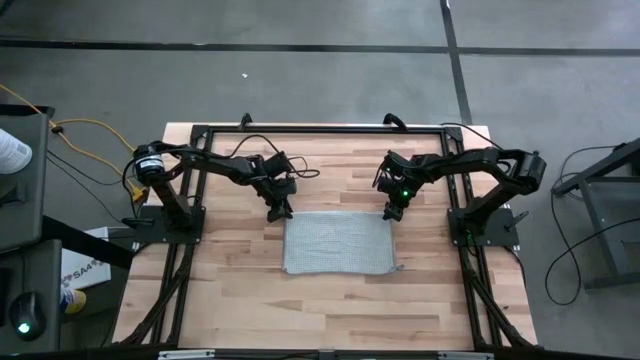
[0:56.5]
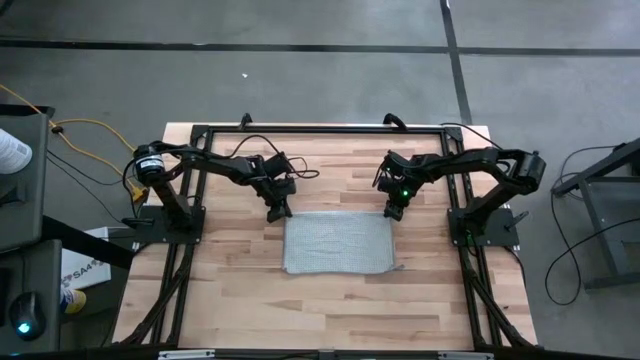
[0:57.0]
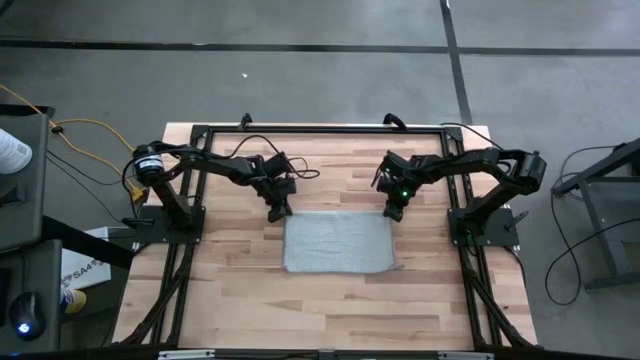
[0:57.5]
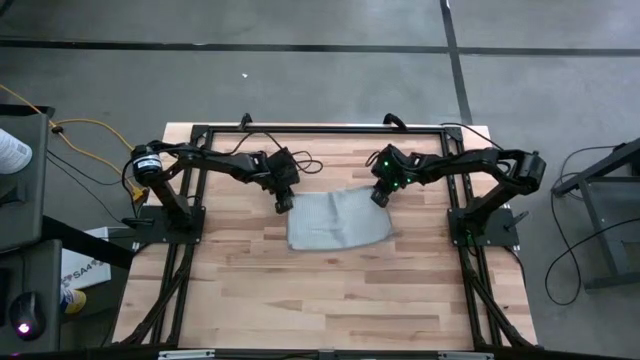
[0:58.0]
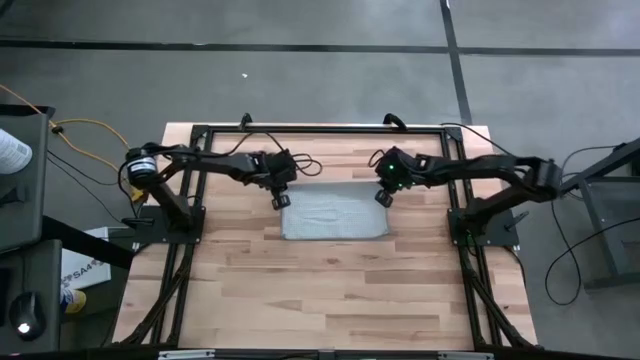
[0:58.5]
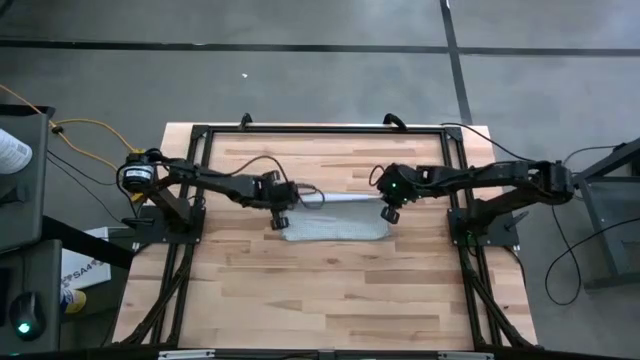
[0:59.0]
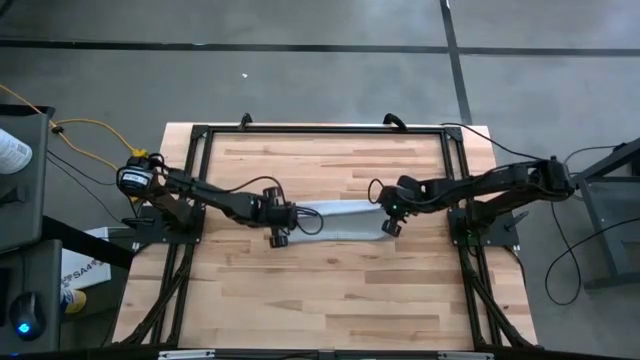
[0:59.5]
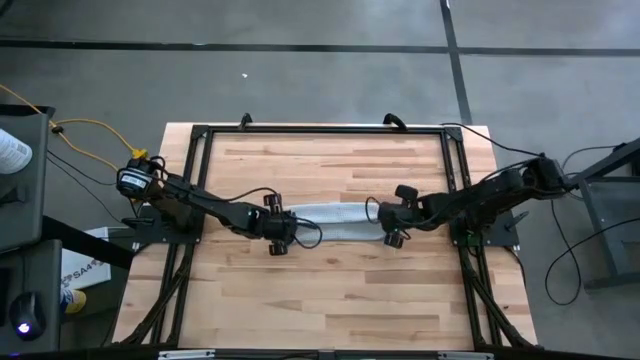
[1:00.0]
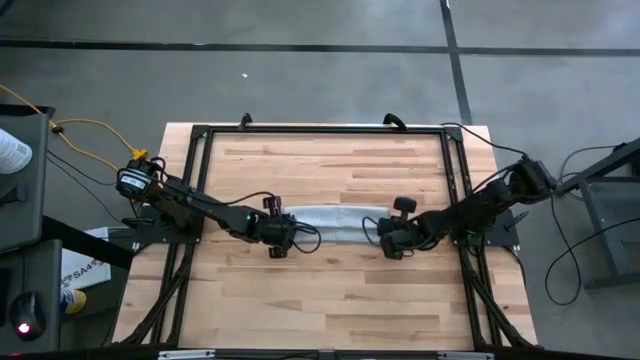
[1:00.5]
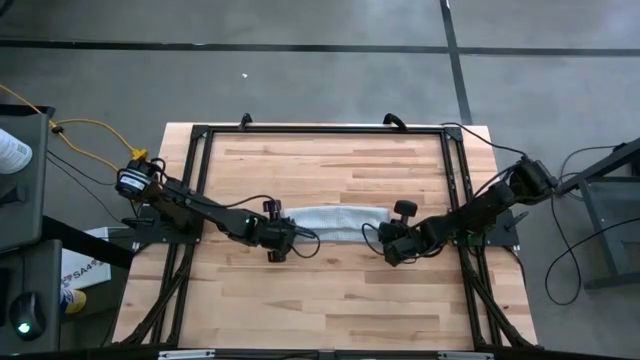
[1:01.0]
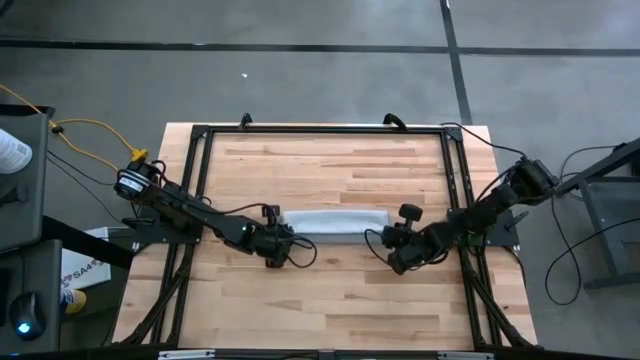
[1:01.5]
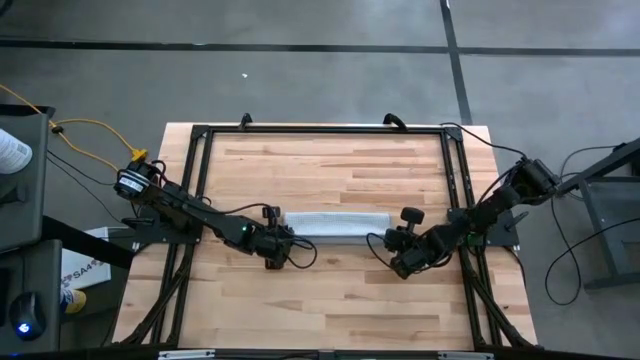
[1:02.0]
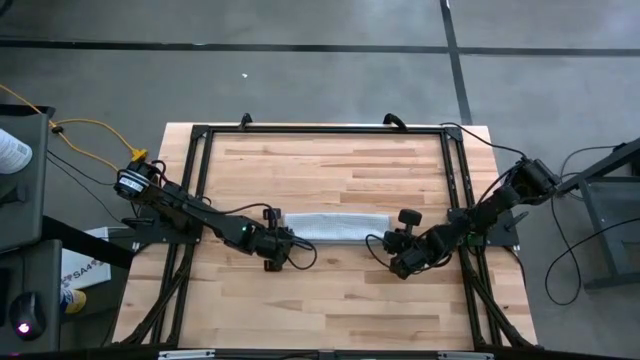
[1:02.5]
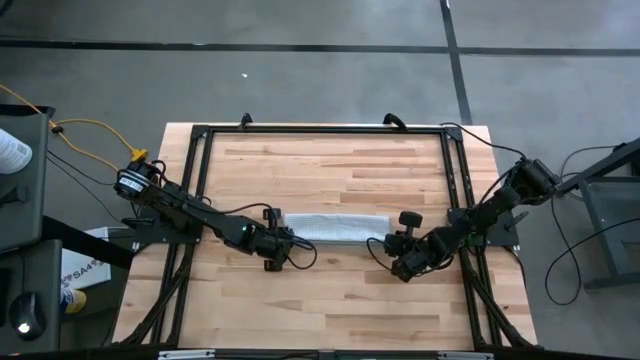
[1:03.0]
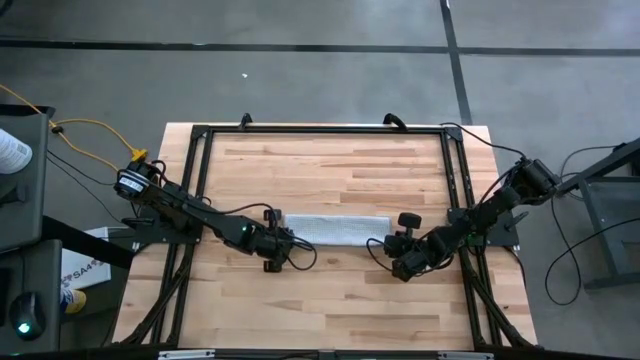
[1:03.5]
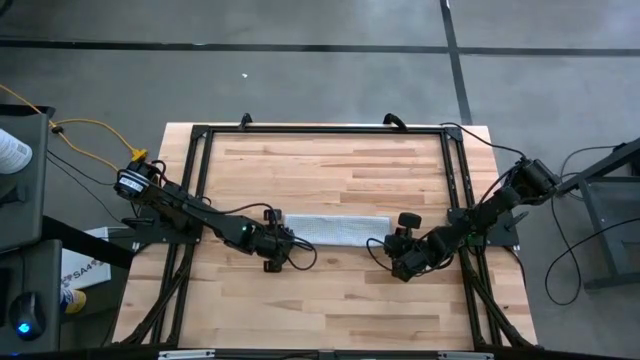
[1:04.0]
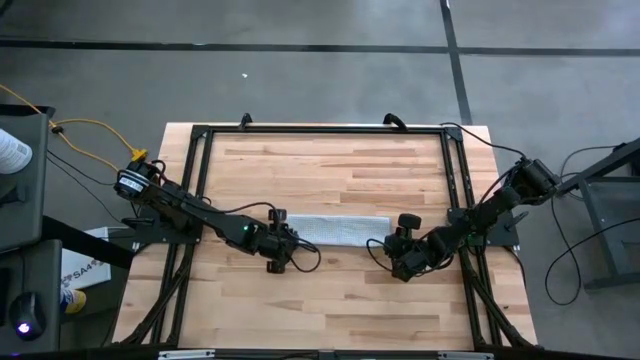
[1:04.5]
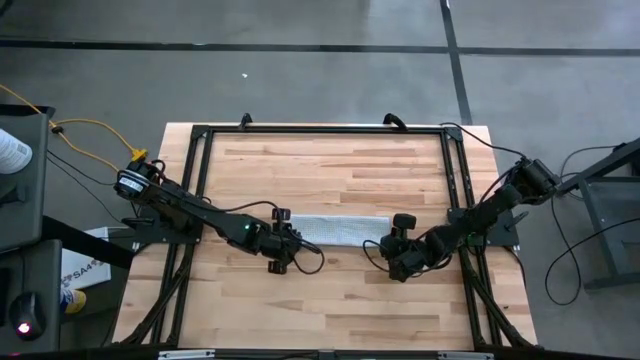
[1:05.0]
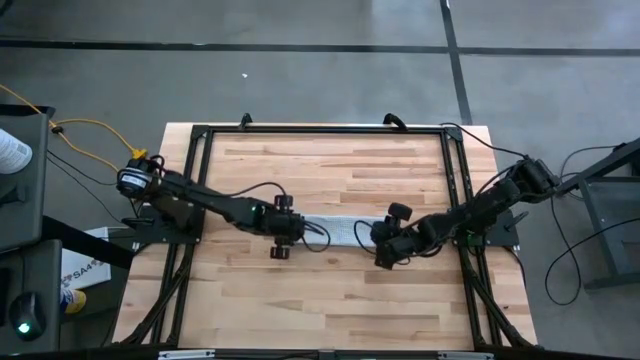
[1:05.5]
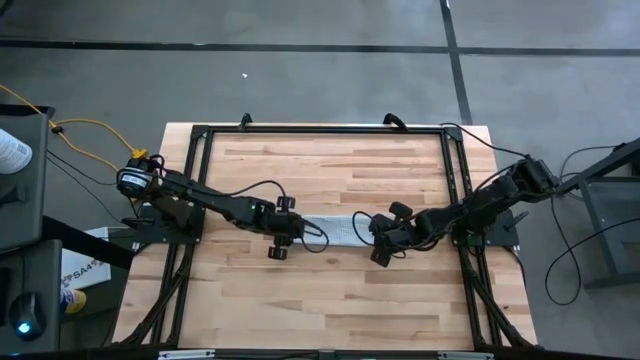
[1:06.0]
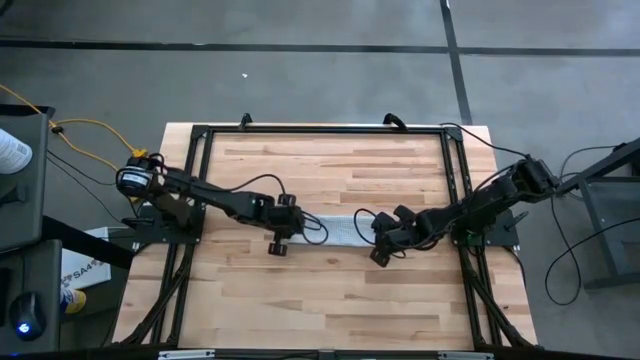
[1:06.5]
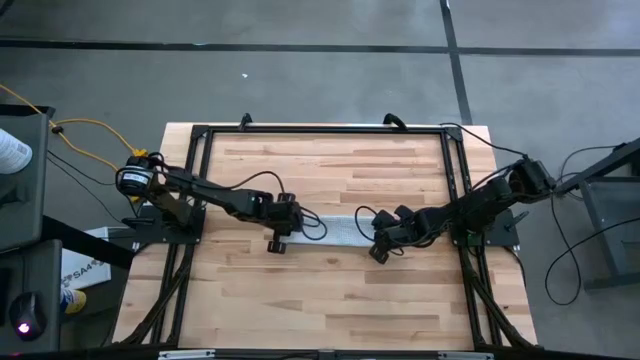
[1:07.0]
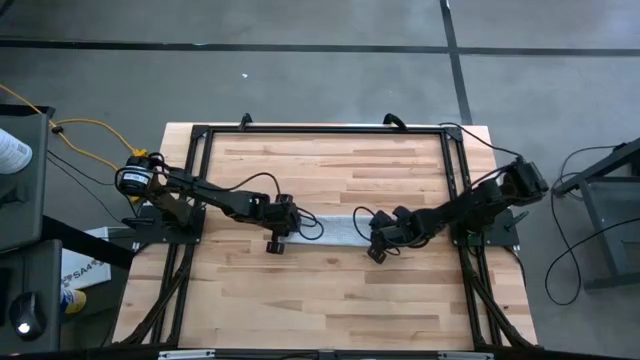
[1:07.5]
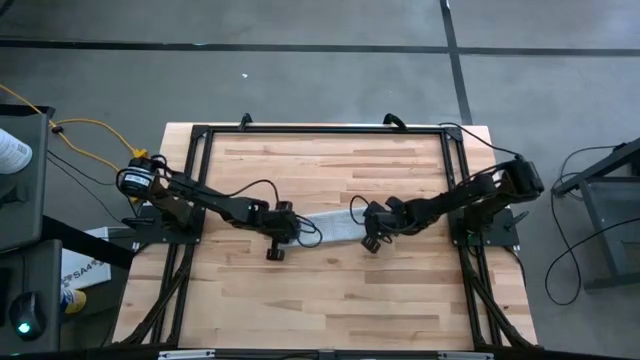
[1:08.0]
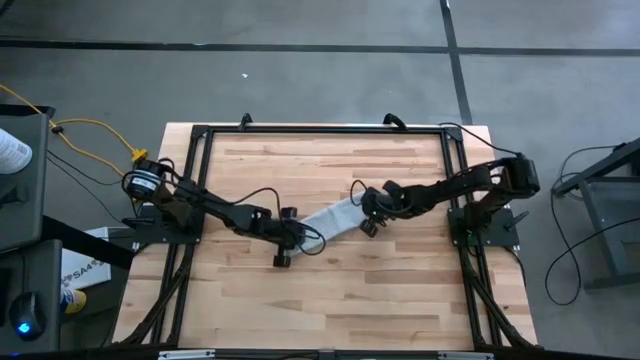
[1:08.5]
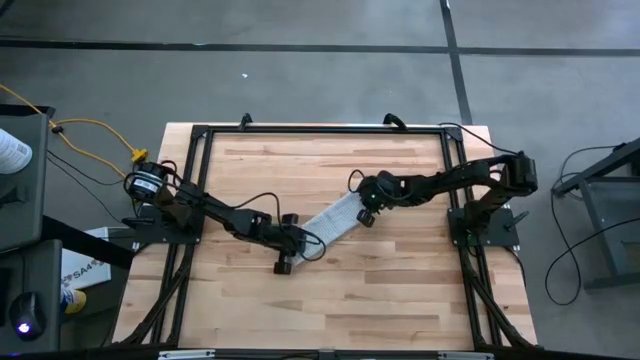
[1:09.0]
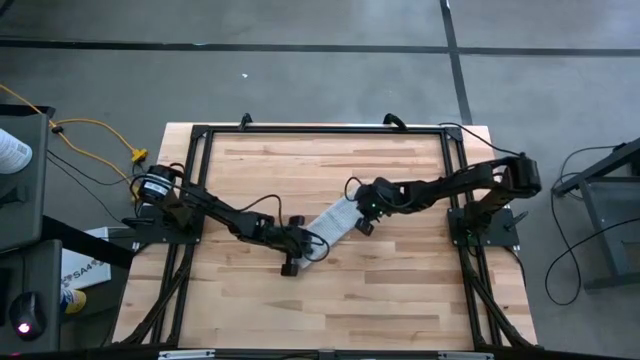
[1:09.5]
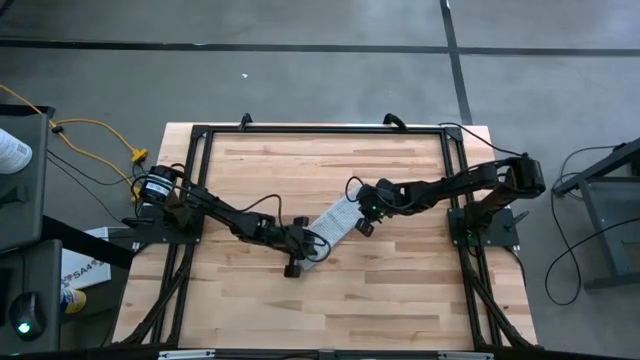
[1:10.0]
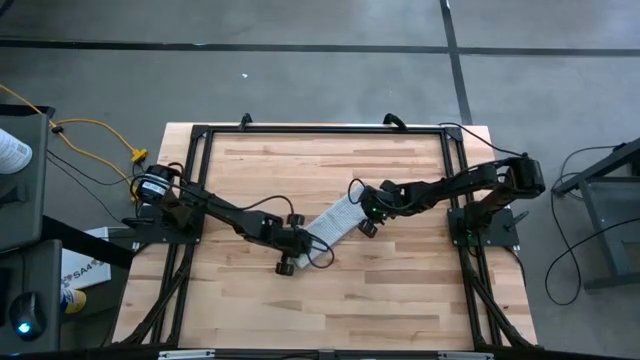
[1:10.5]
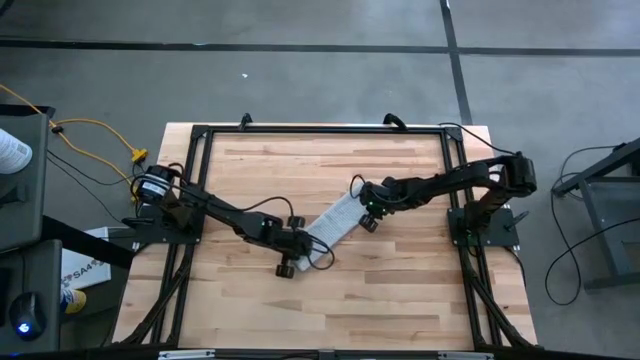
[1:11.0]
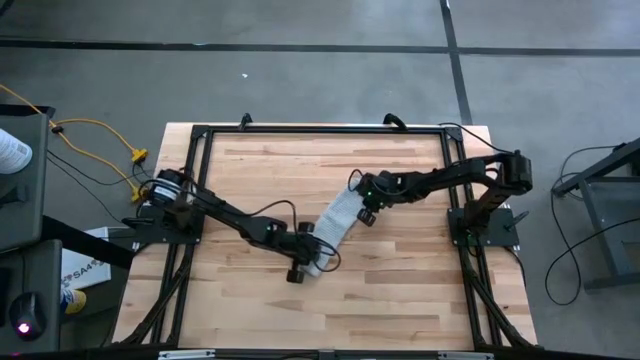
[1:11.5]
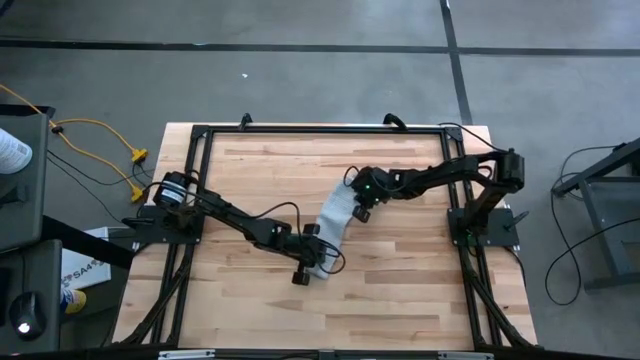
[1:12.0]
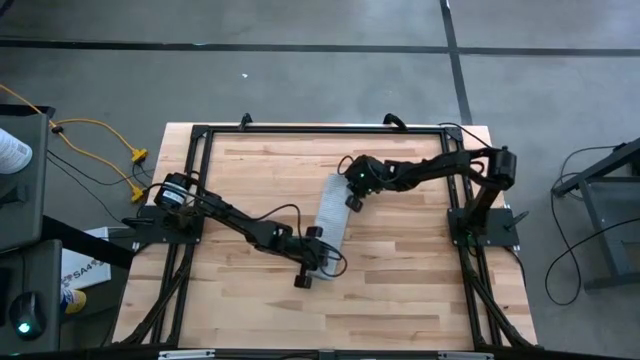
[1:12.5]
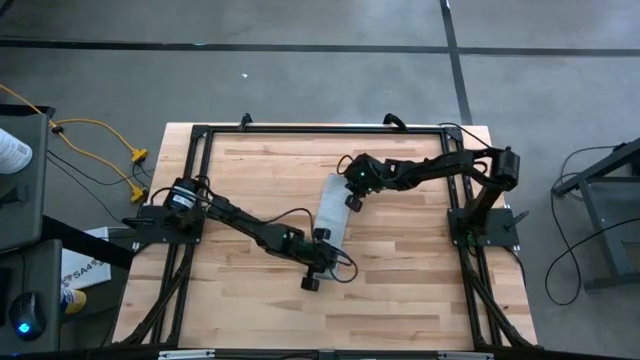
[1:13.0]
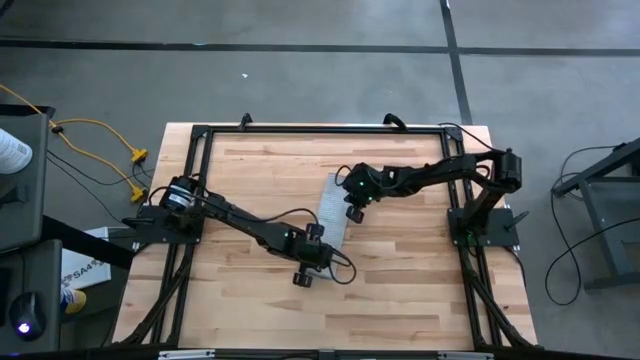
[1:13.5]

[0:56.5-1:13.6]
Task: Fold microfiber towels
Fold the gray microfiber towel

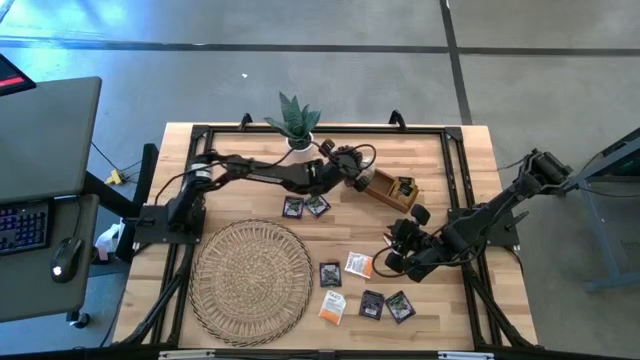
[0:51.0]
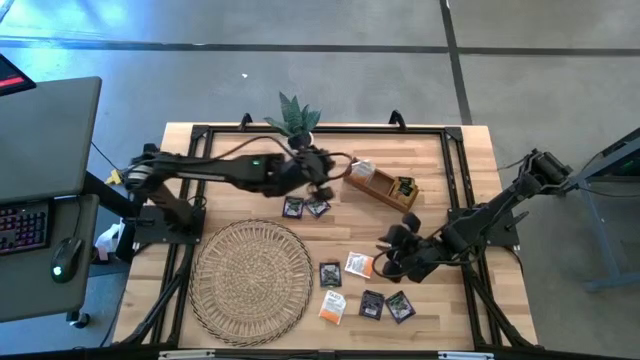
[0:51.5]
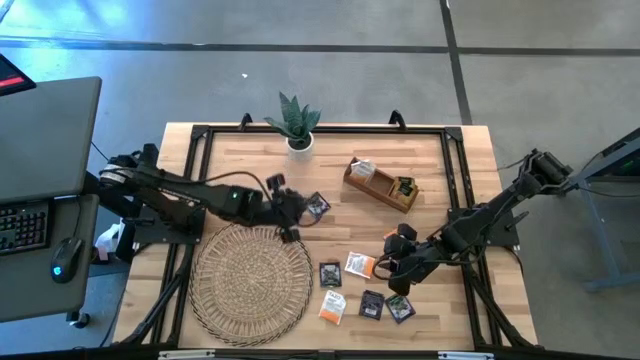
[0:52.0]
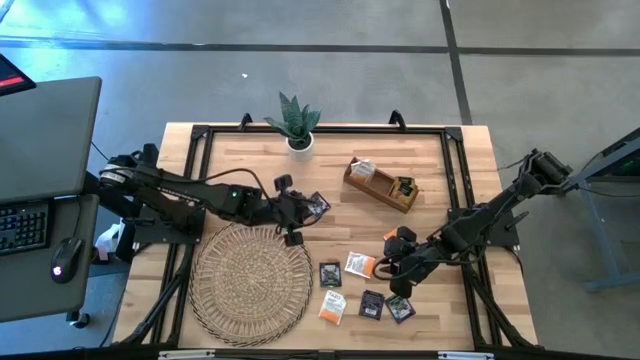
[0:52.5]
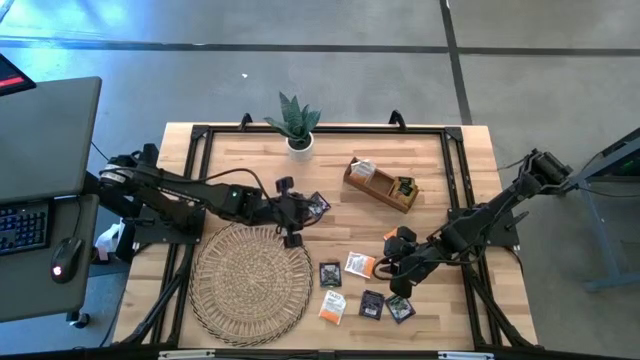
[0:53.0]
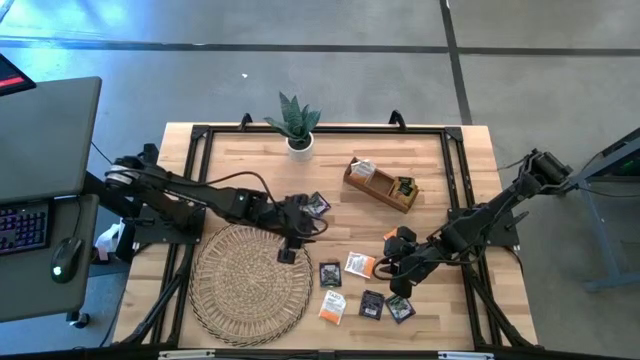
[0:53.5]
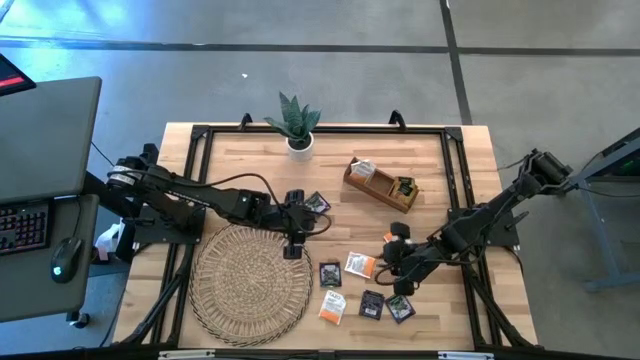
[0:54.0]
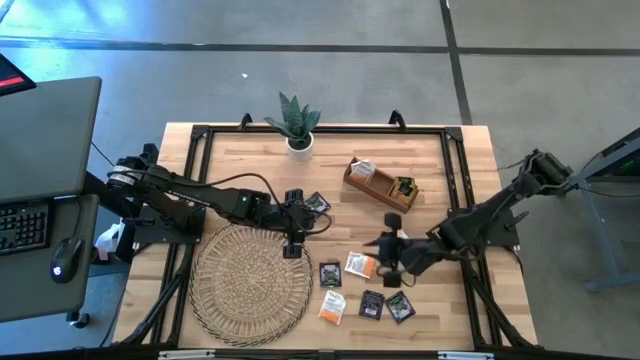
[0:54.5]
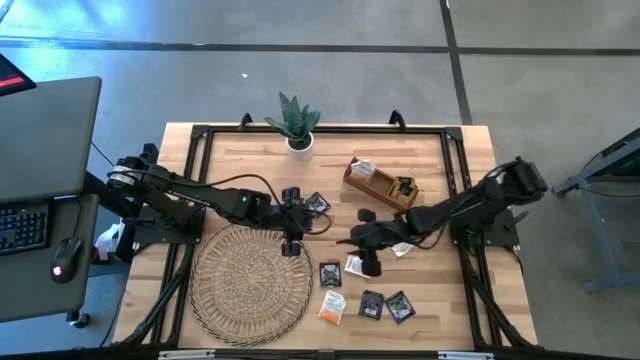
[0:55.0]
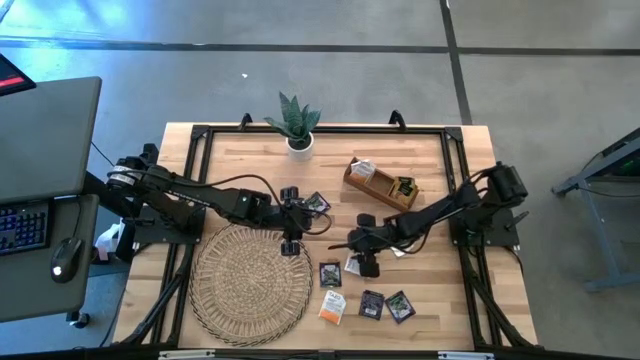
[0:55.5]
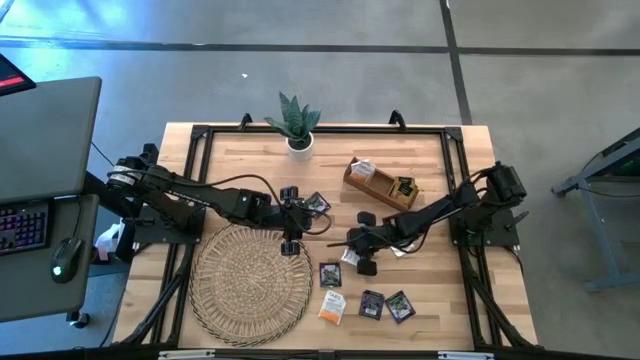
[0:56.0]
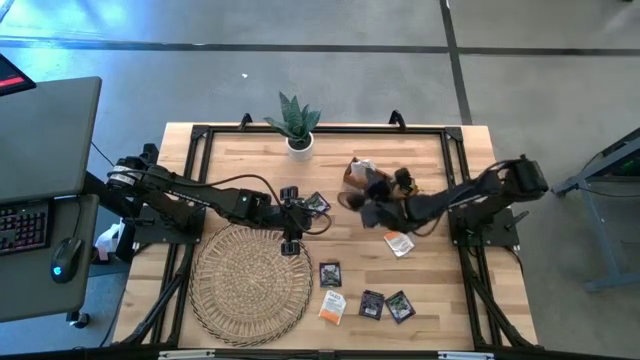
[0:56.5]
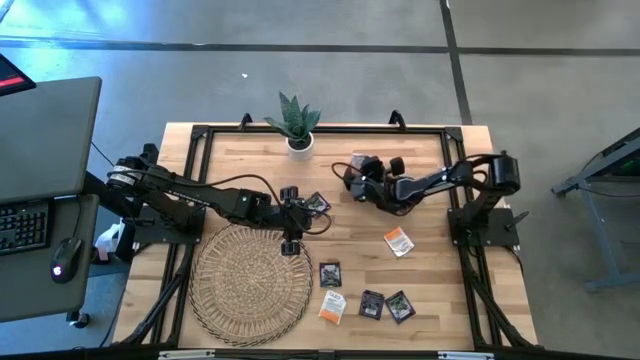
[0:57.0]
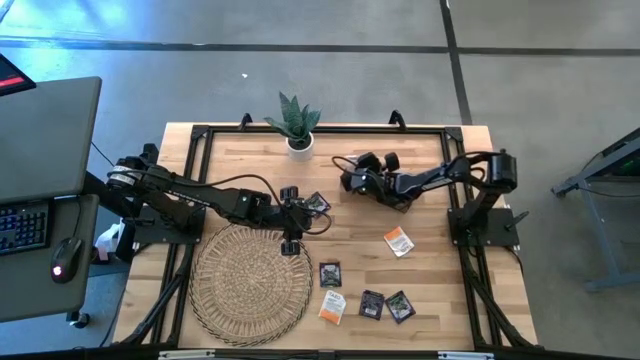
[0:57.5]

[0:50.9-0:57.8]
Task: Pick & Place Tea
Put the white tea bag into the left section of the wooden organizer
